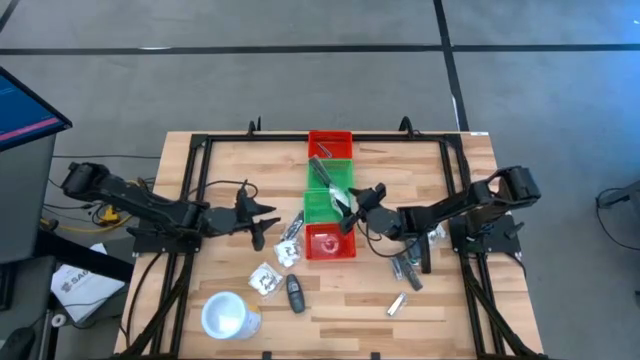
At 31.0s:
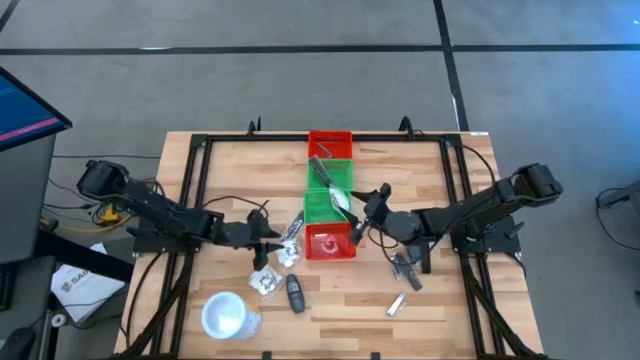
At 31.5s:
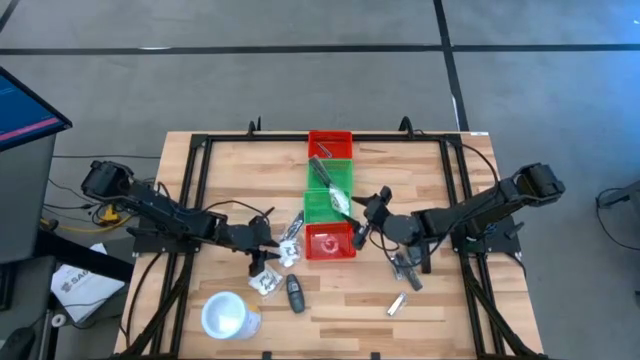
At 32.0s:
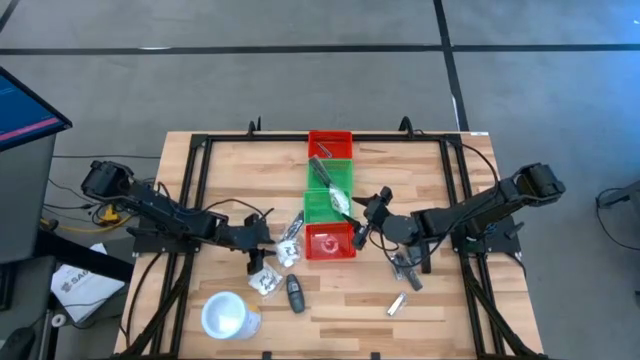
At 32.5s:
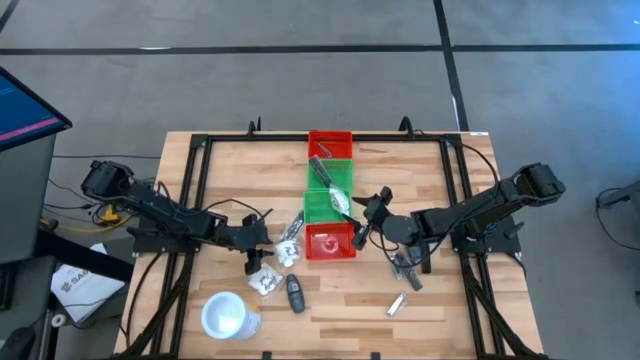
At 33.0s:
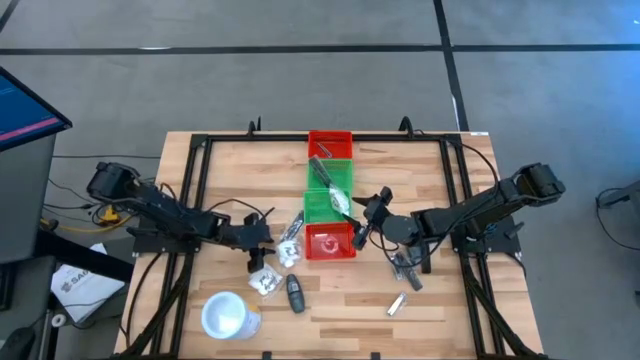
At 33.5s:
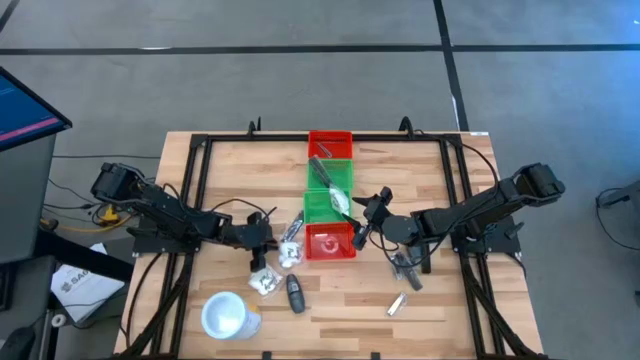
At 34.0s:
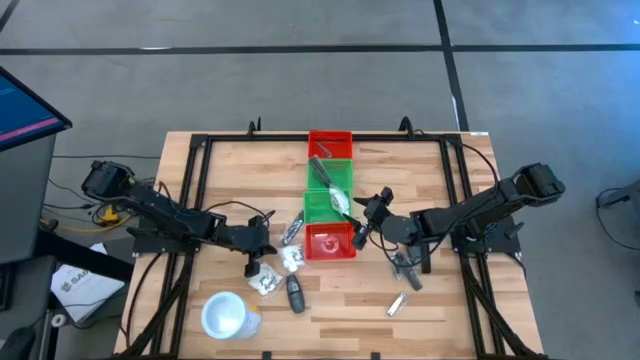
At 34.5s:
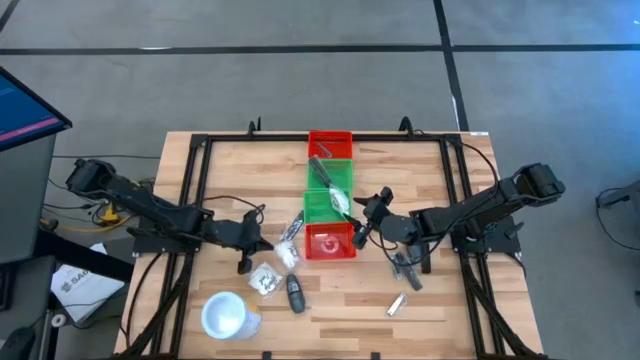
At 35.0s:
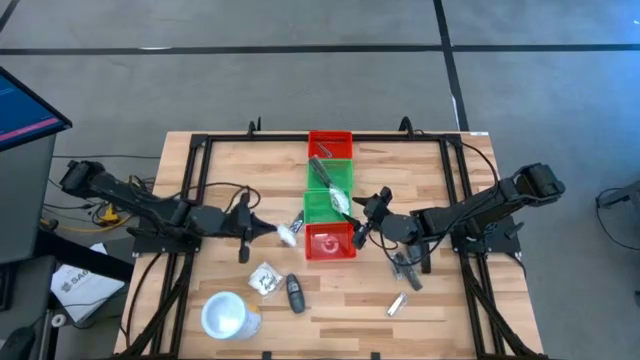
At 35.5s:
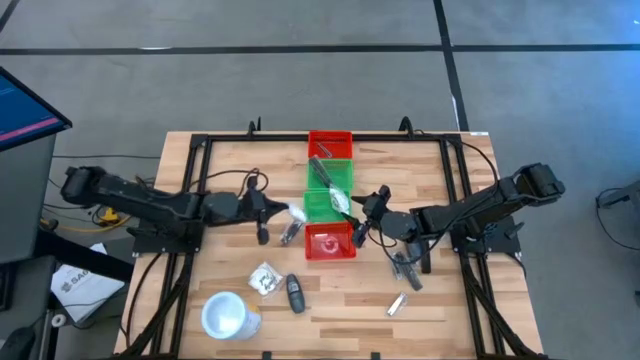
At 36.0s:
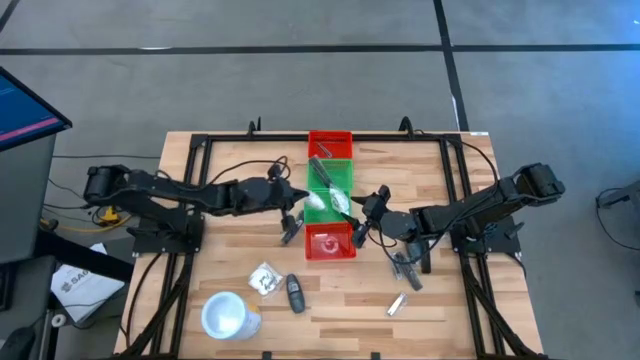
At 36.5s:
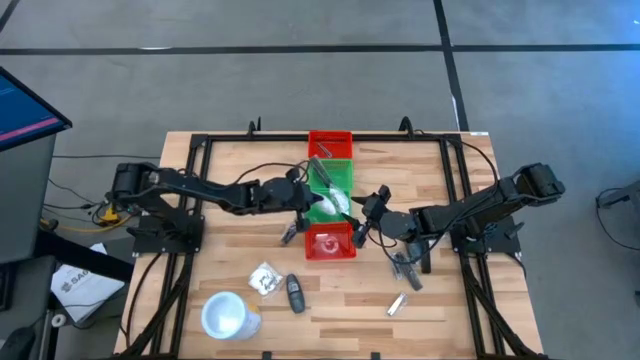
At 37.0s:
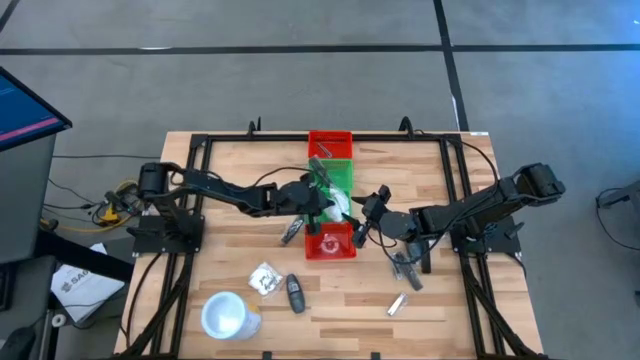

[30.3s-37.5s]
Task: Pick & Place Travel size toiletries
Put the white cotton pack into the bottom green bin

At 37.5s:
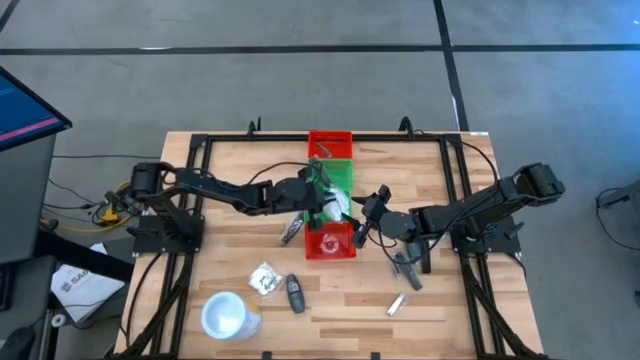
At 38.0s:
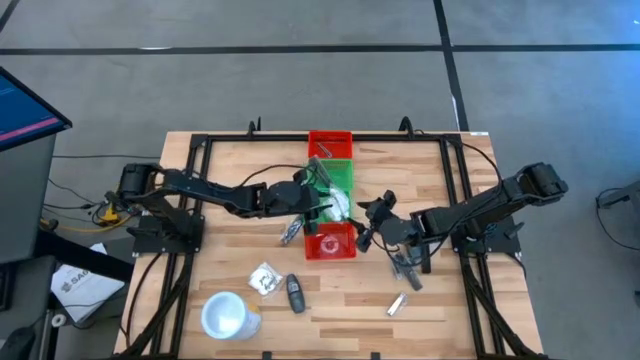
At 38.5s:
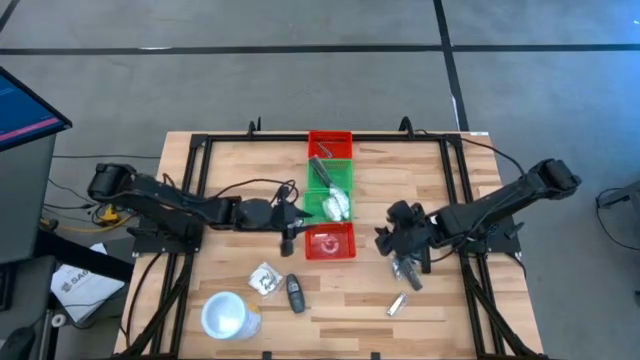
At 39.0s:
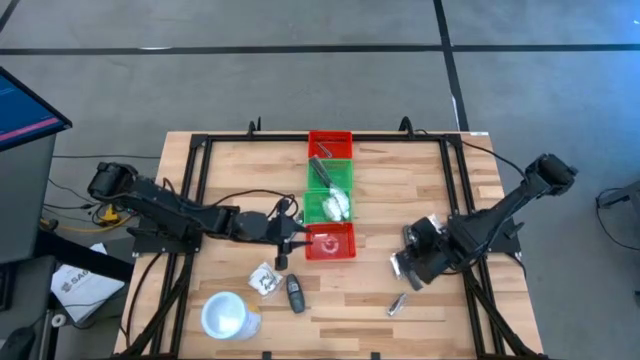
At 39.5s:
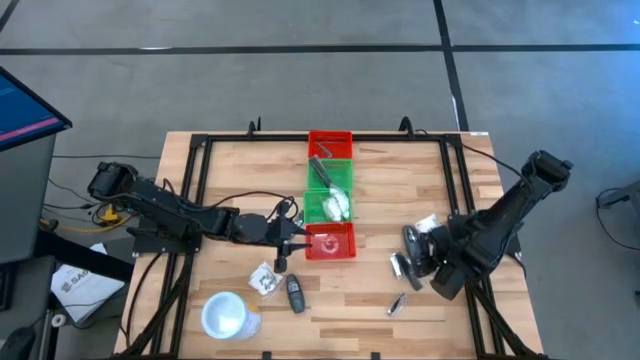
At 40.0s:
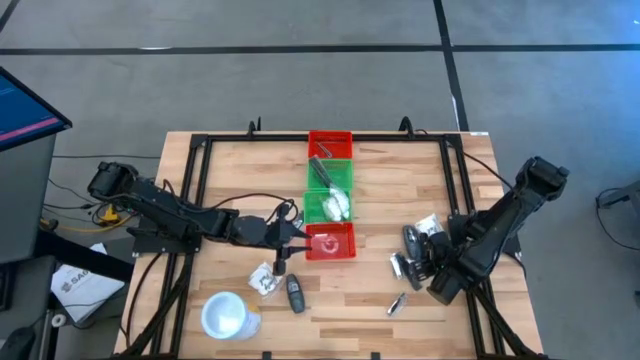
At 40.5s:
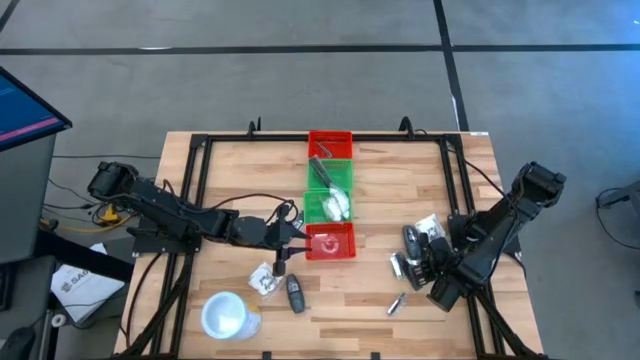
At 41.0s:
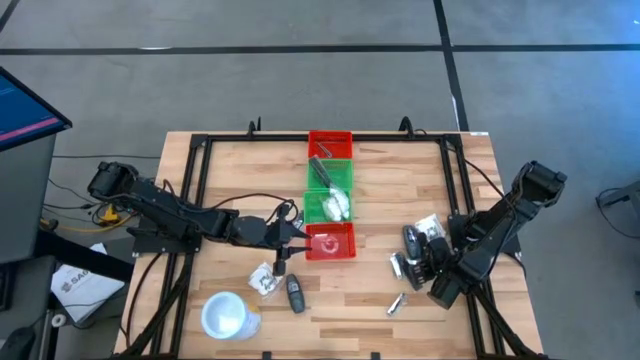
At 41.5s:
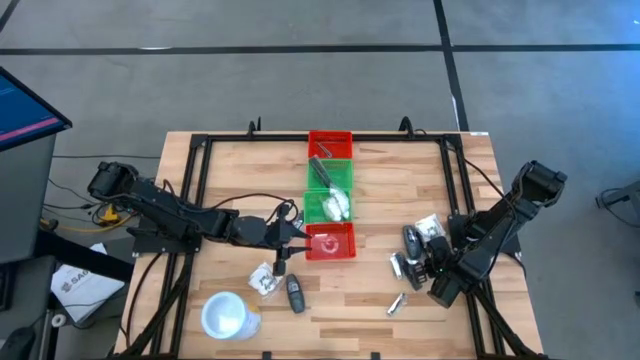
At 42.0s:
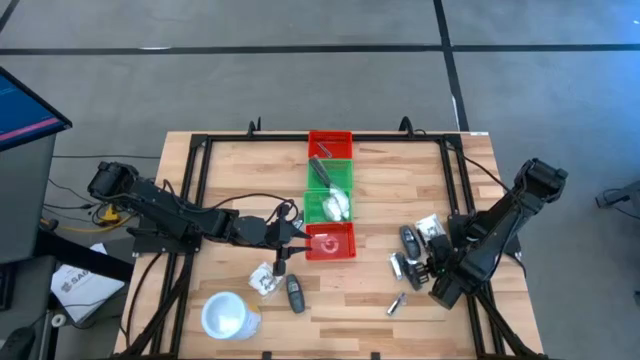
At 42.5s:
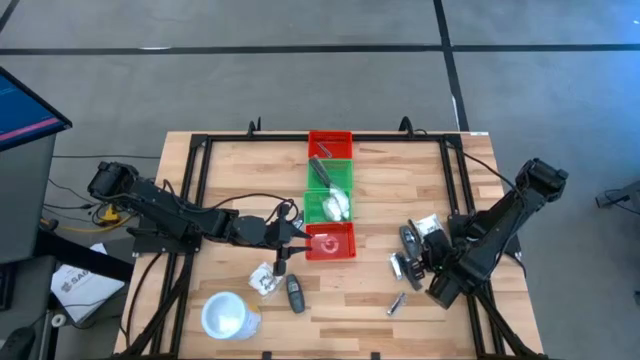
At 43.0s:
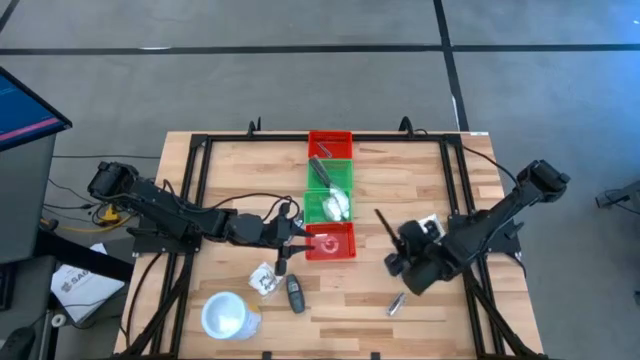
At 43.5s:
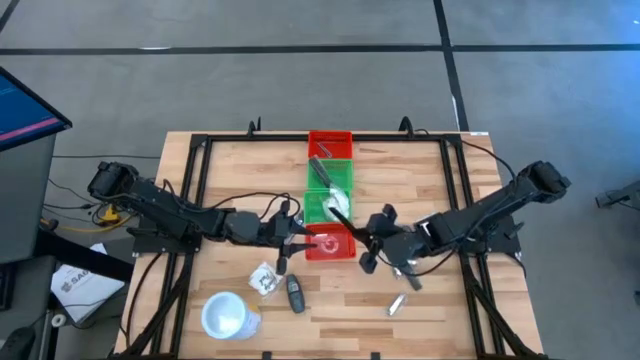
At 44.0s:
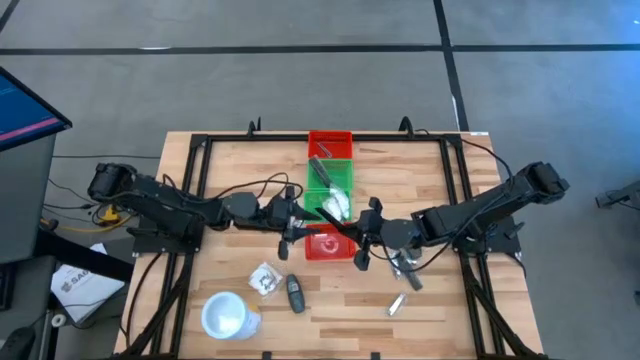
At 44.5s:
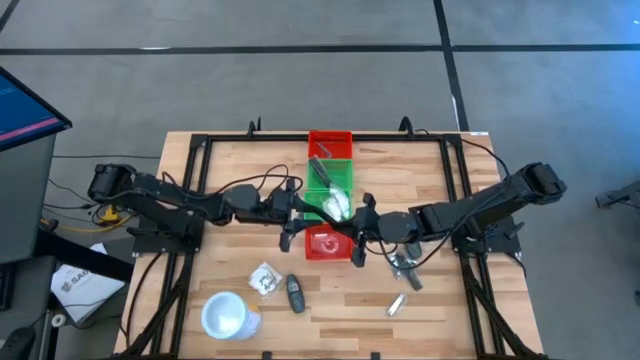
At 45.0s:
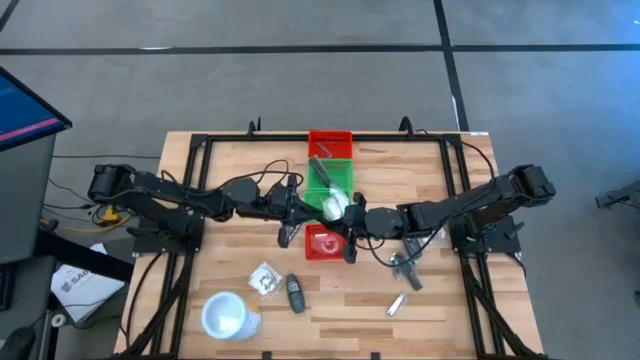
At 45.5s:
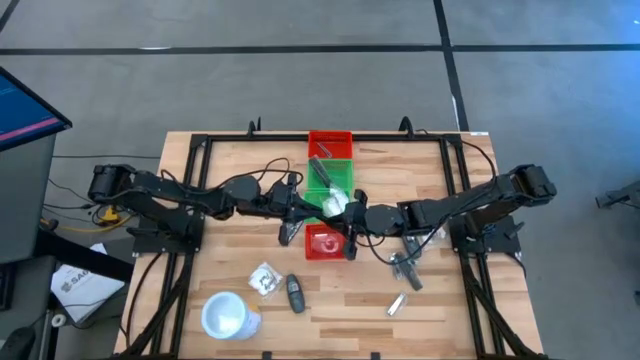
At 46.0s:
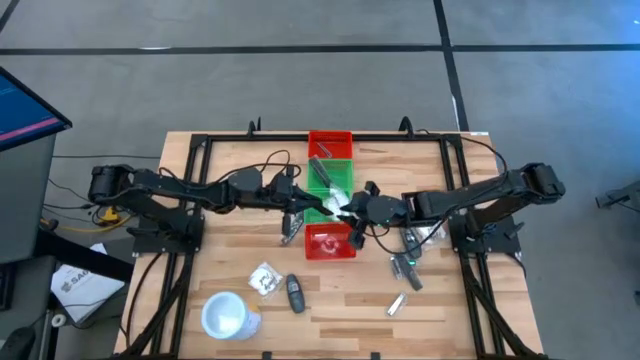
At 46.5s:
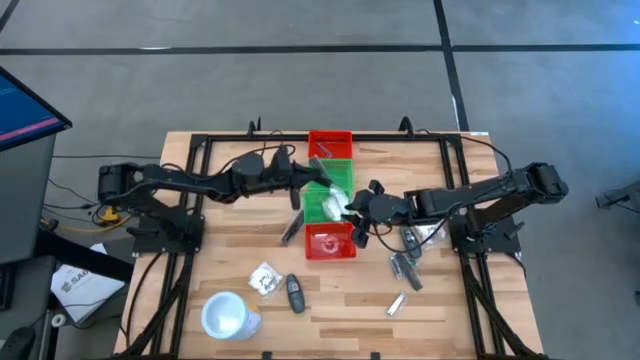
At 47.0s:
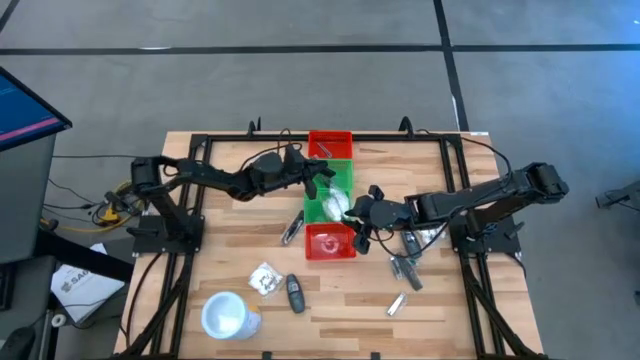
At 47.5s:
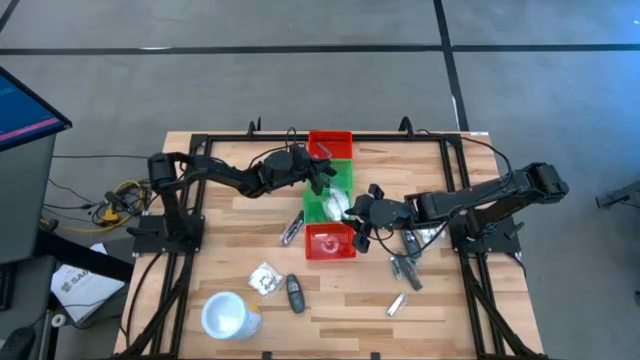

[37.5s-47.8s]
Put the black comb into the top green bin

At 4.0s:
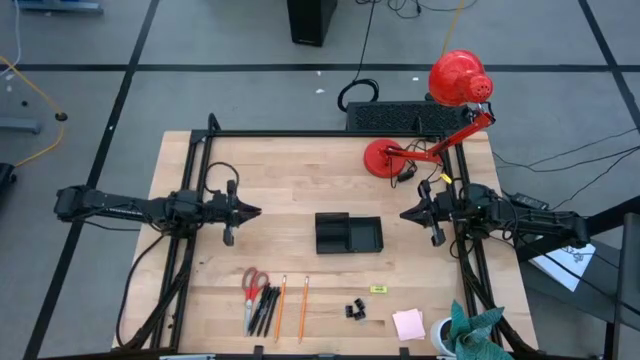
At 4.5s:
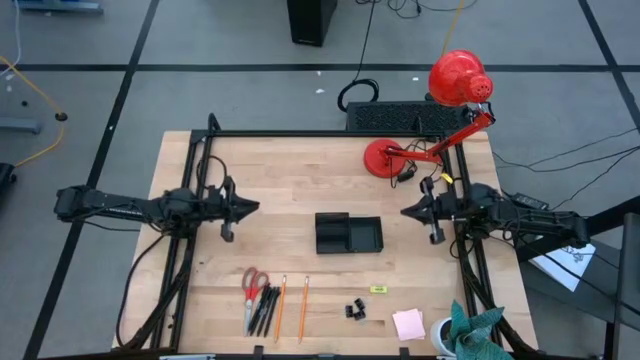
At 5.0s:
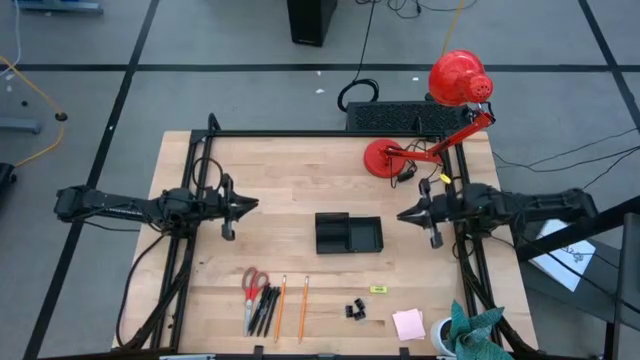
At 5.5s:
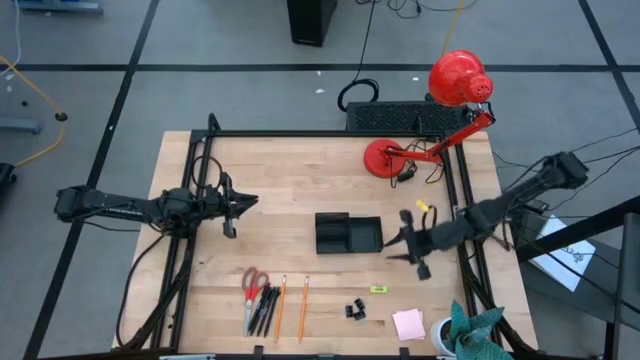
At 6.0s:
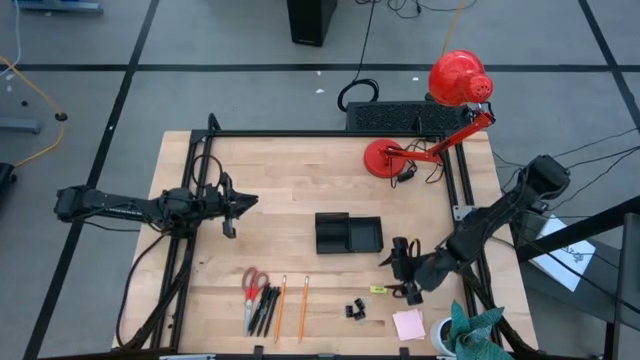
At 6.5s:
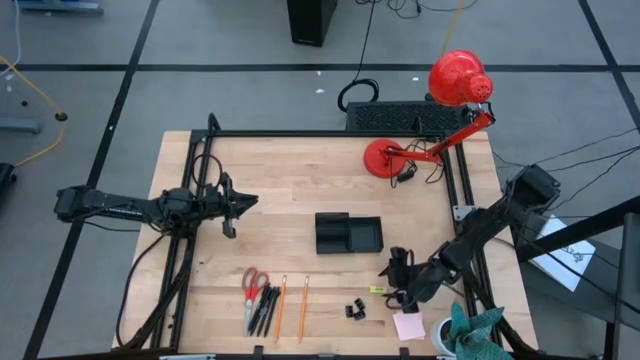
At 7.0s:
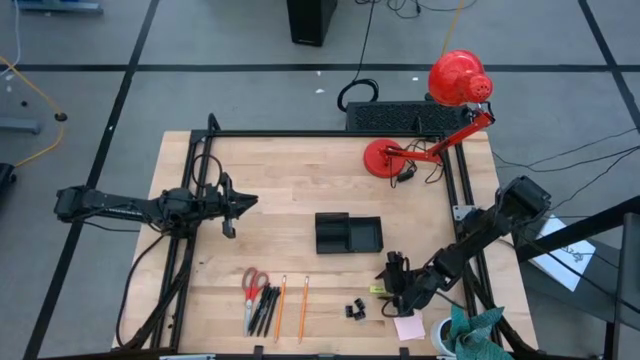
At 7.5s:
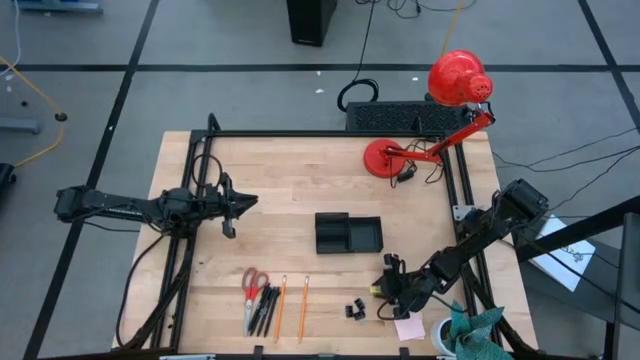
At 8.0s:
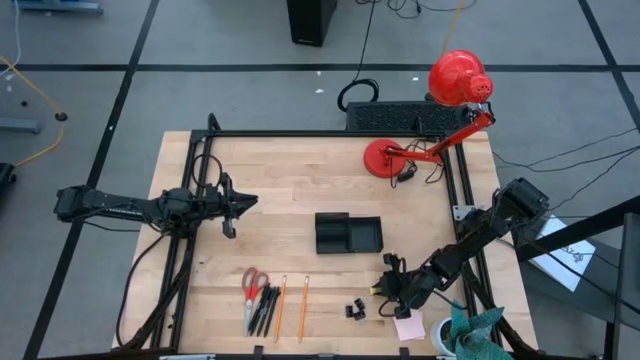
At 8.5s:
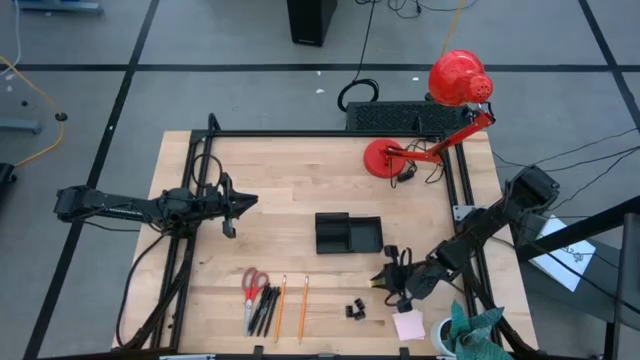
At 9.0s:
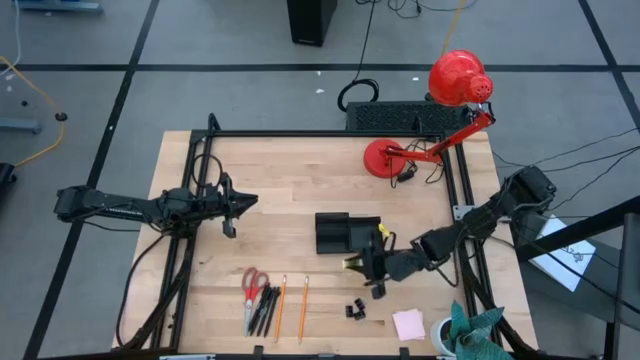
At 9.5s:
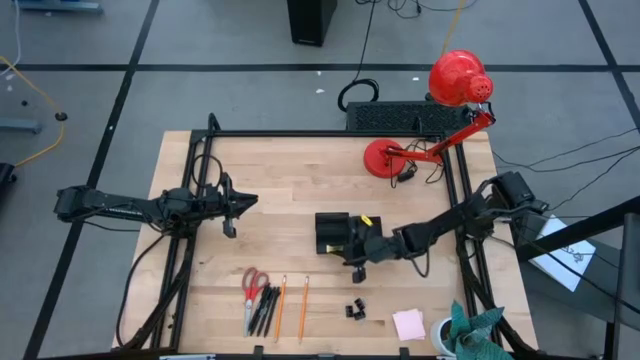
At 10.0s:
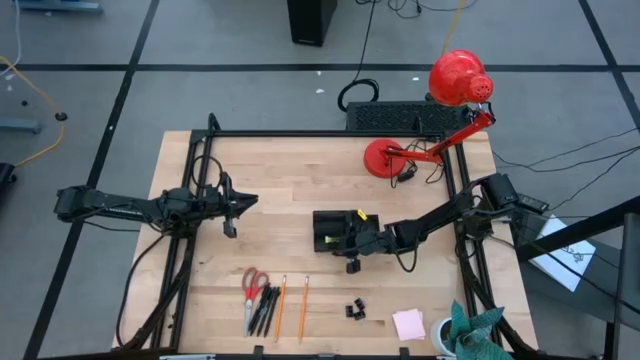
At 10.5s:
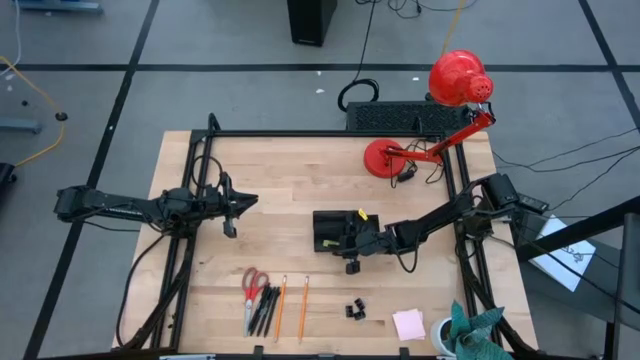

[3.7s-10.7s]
Task: Pick and place office supplies into organizer
Put the yellow eraser into the desk organizer
